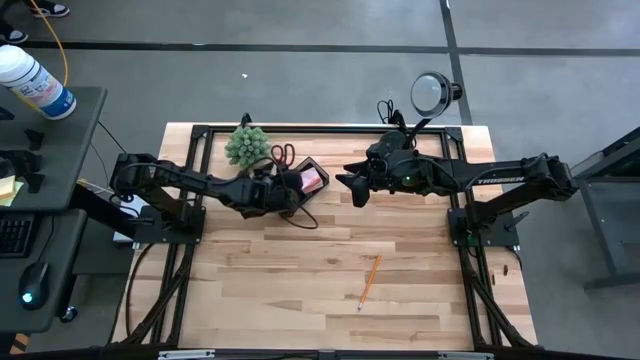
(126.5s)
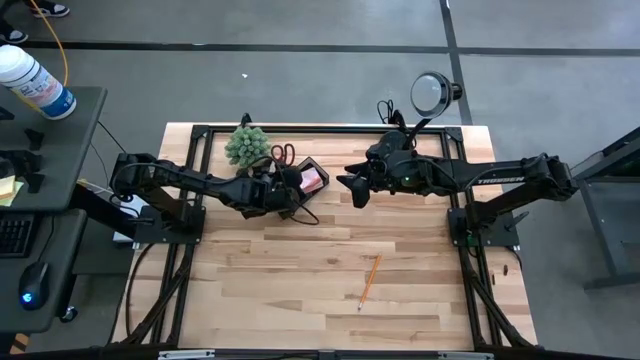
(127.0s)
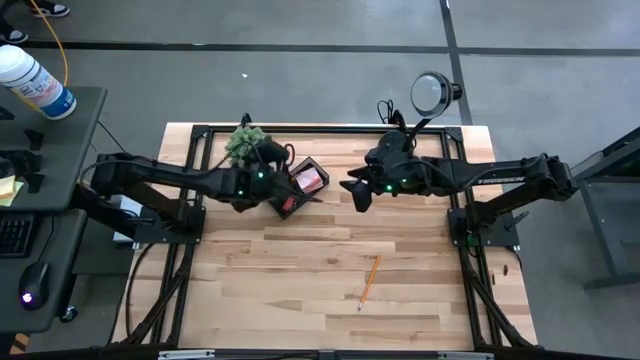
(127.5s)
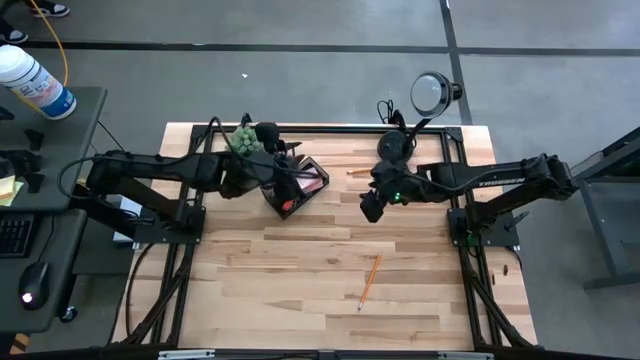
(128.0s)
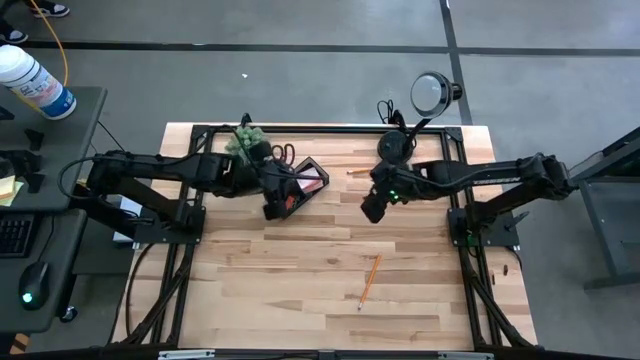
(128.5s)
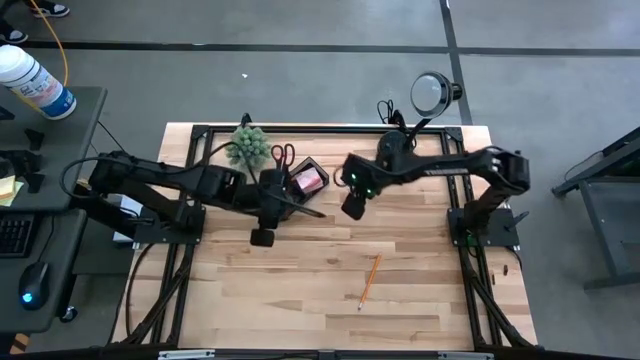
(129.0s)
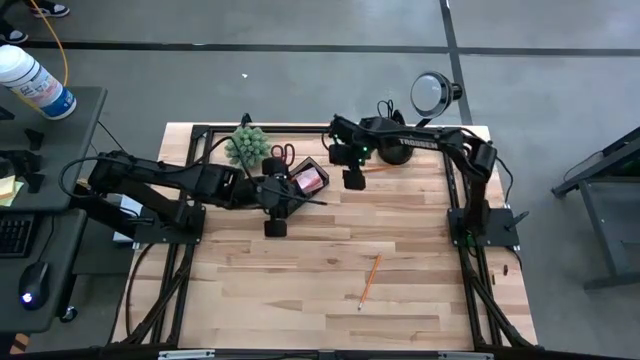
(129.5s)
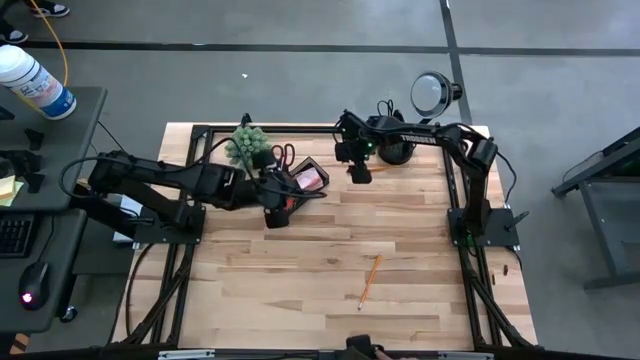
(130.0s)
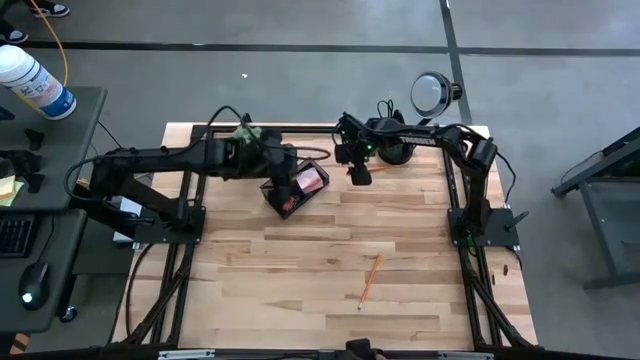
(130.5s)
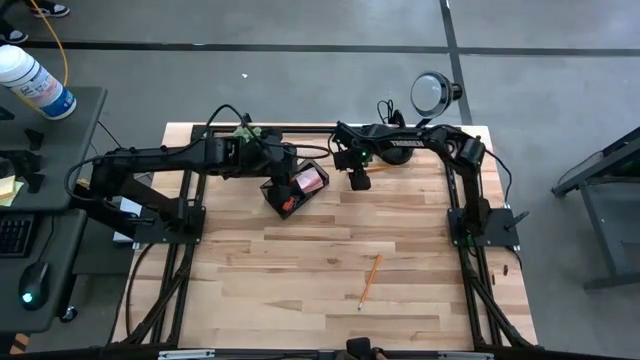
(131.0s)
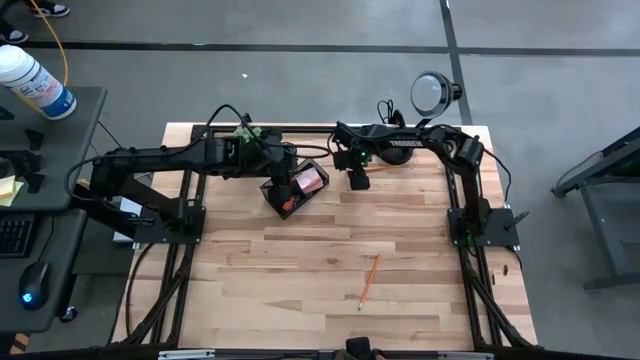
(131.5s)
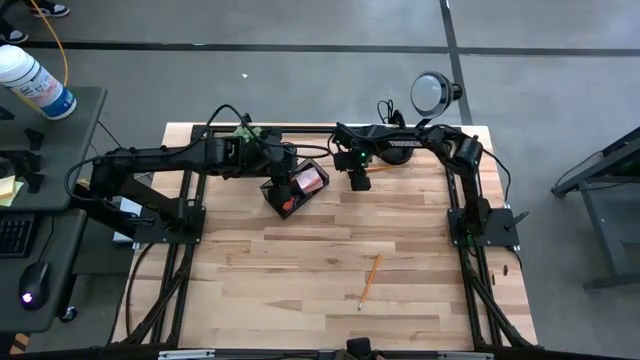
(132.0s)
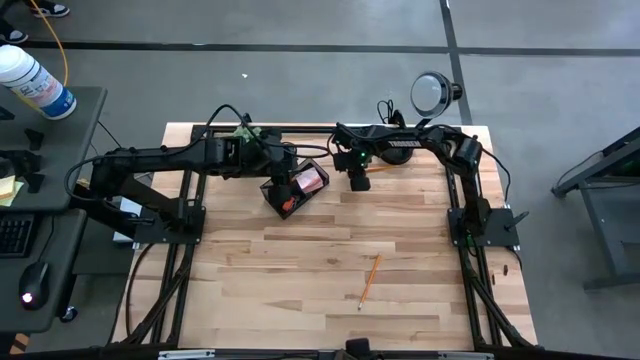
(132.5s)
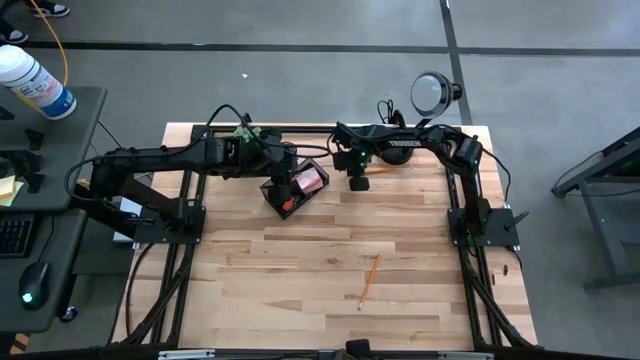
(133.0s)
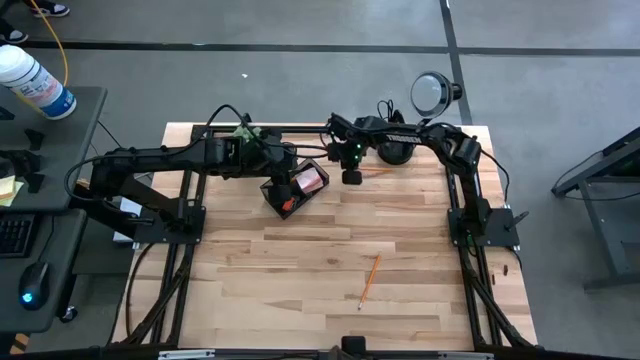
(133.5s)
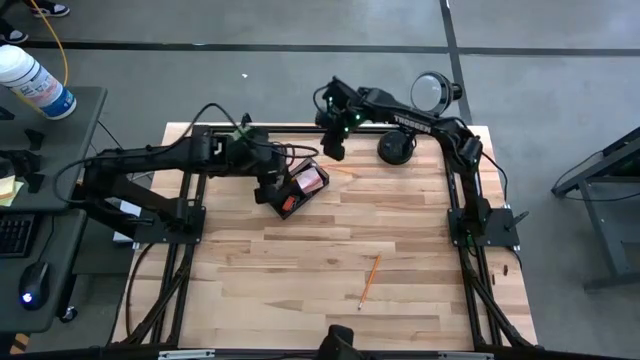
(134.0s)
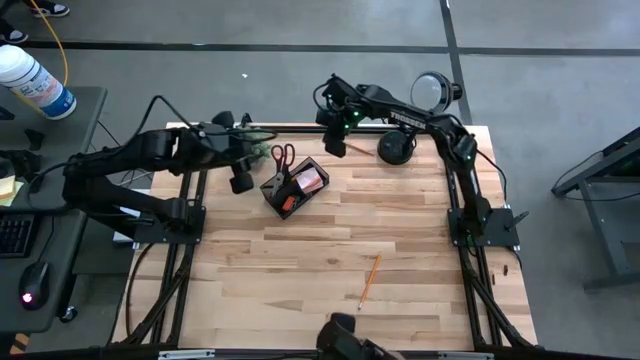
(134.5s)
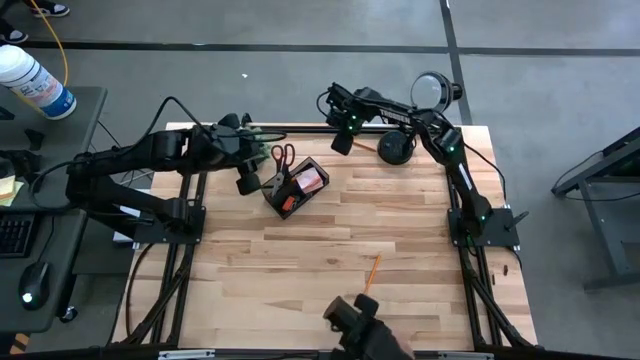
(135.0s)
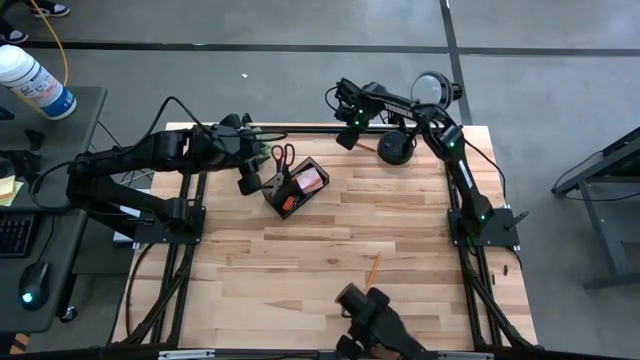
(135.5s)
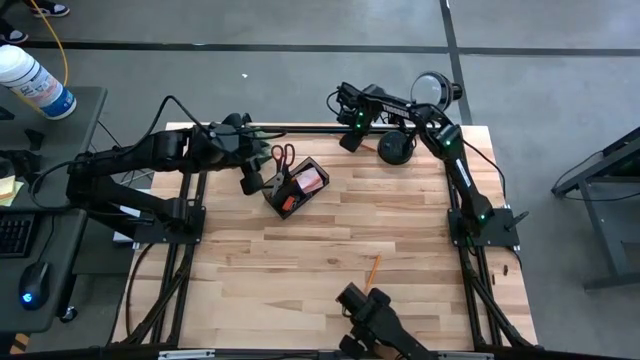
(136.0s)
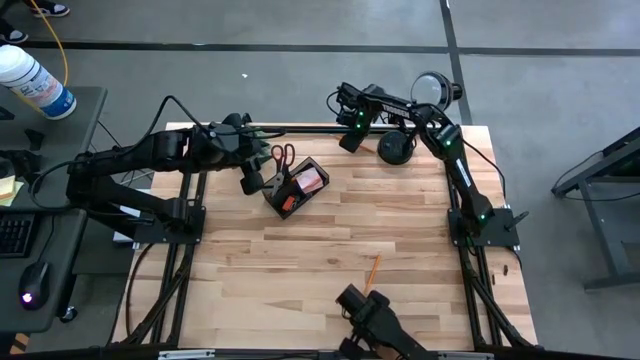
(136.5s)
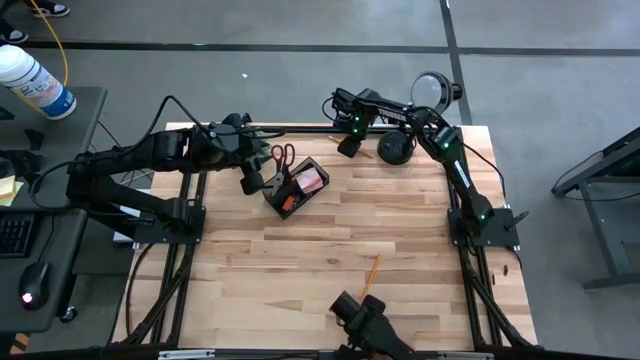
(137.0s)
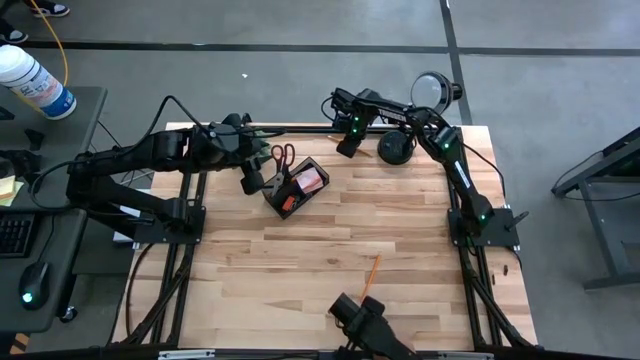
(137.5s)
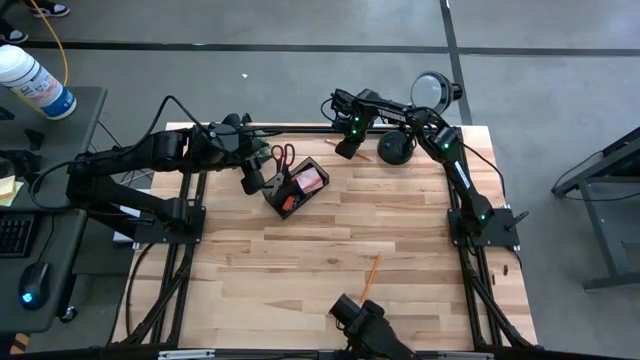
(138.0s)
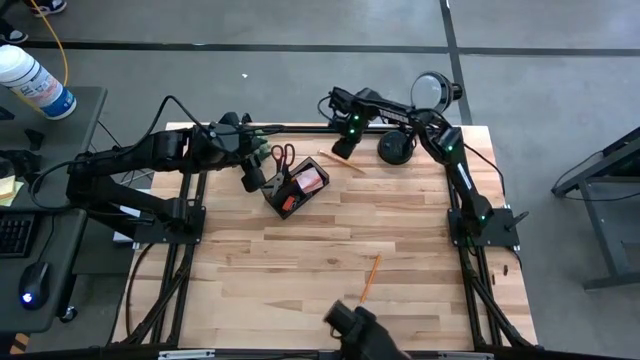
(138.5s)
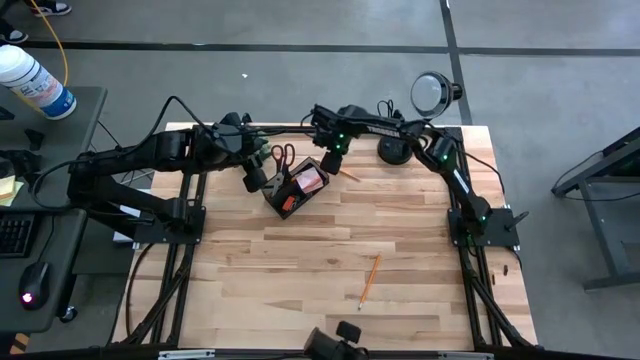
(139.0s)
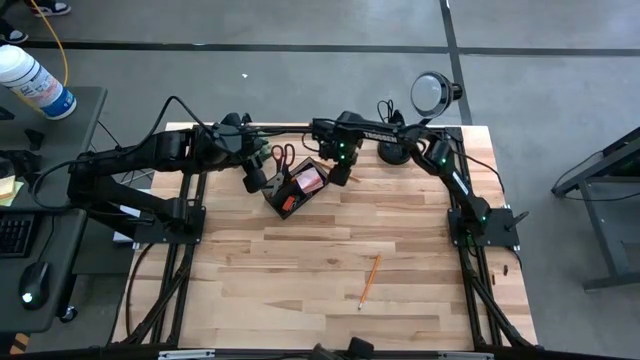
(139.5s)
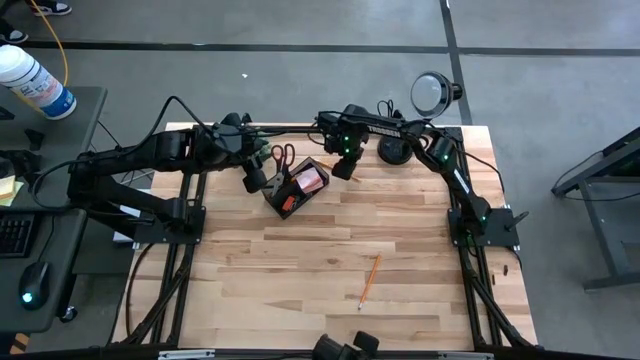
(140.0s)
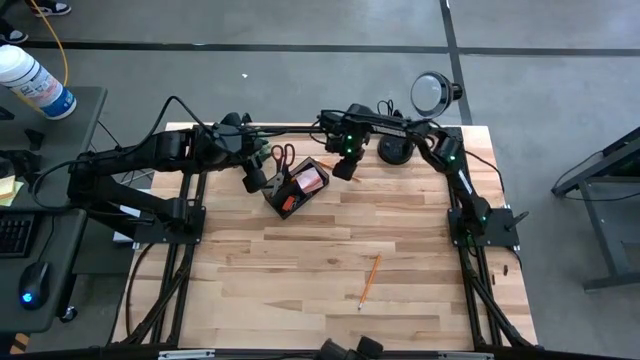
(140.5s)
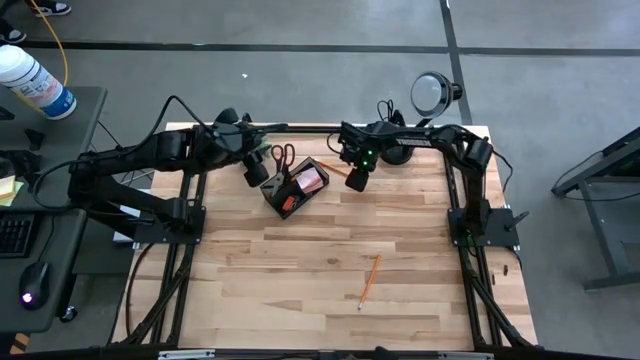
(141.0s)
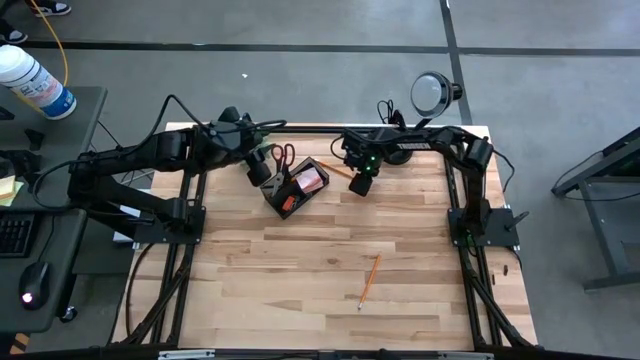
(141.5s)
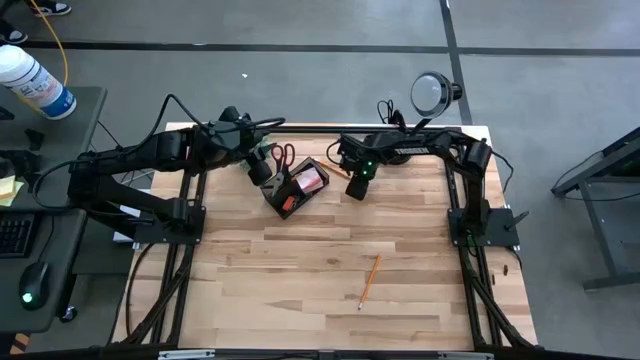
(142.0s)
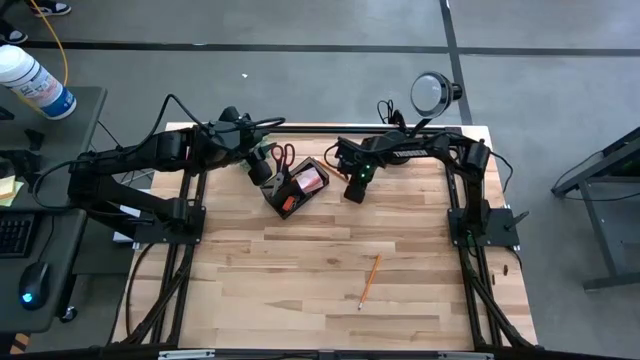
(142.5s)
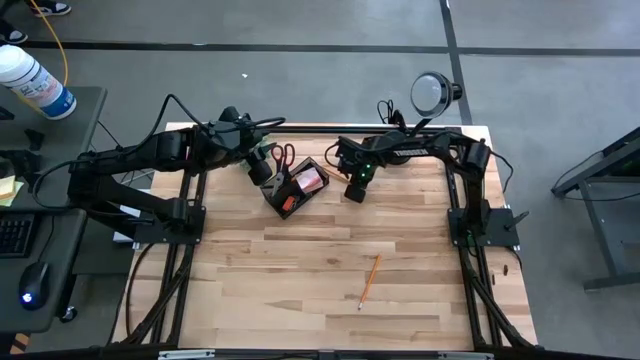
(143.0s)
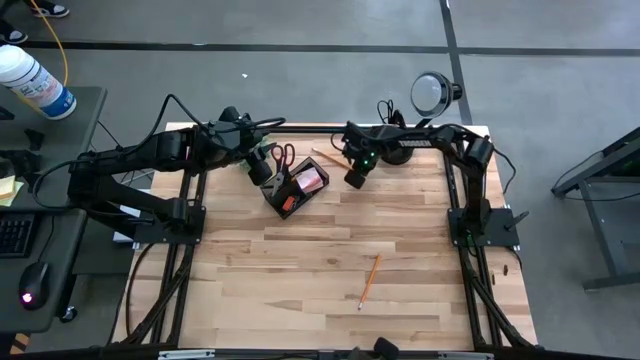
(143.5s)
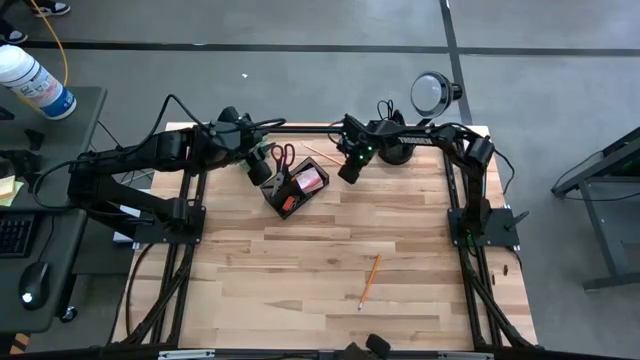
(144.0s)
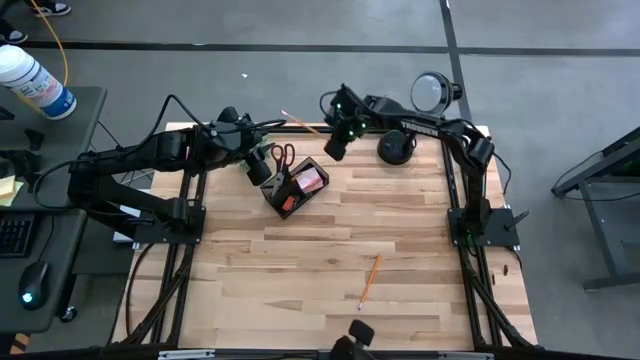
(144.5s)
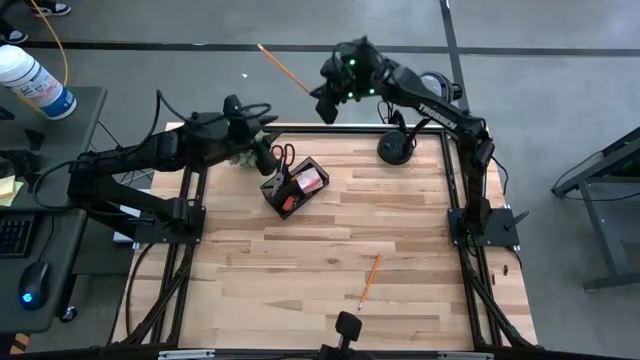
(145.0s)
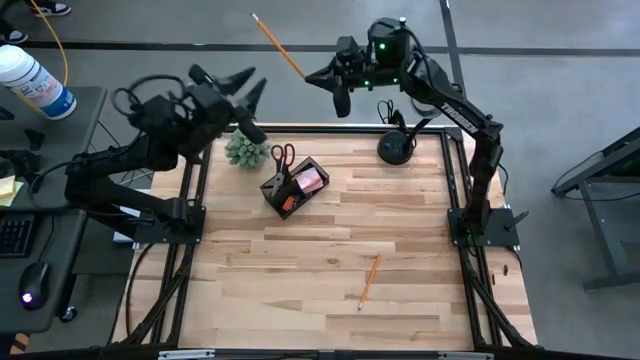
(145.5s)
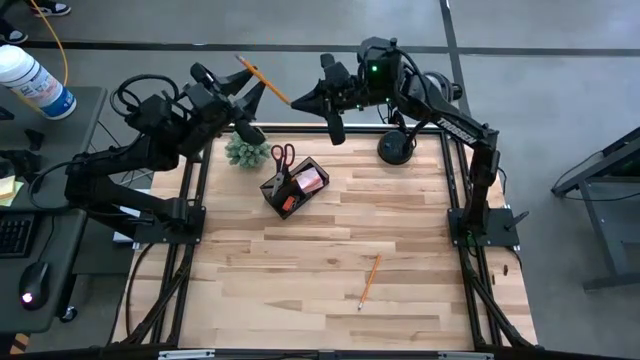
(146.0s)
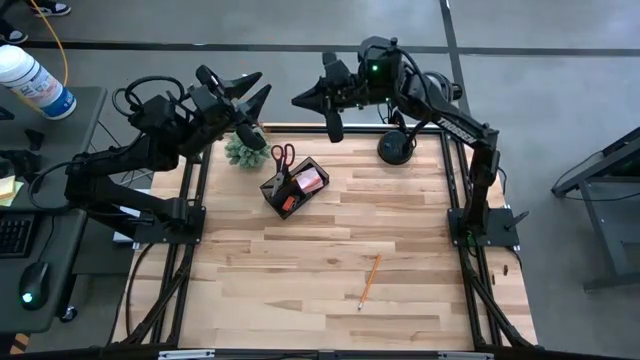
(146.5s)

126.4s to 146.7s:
Task: Pick and place office supplies into organizer
Put the top orange pencil into the black desk organizer
